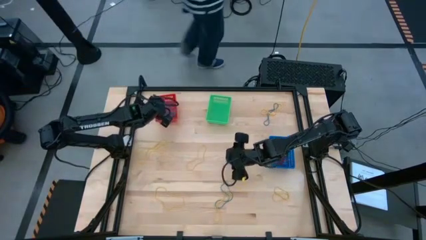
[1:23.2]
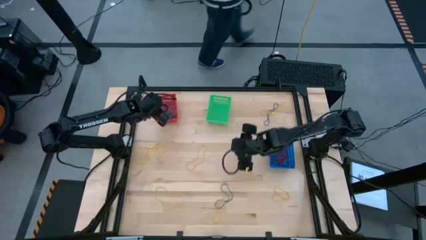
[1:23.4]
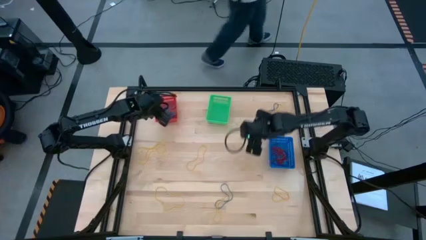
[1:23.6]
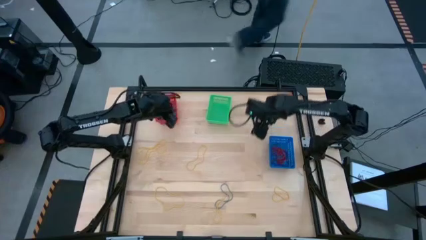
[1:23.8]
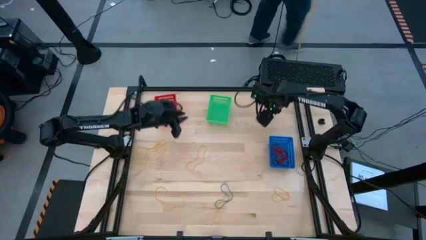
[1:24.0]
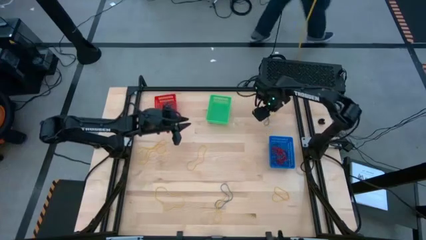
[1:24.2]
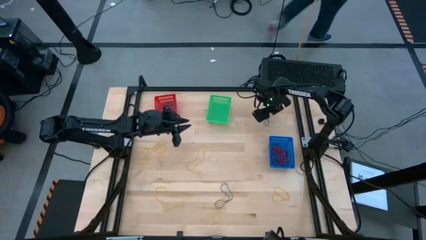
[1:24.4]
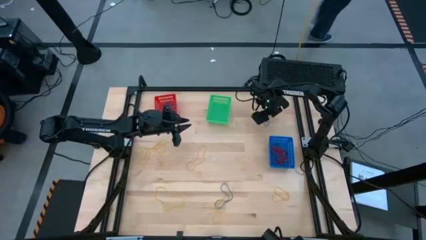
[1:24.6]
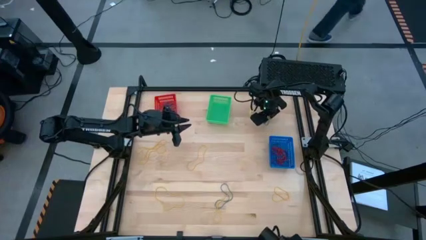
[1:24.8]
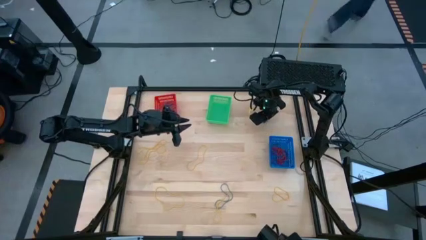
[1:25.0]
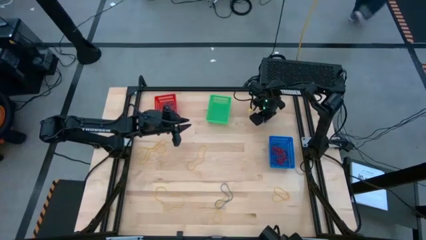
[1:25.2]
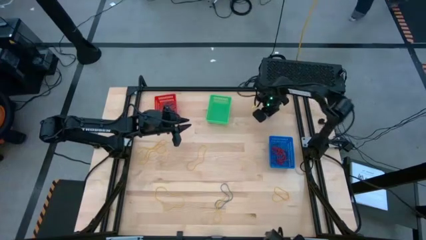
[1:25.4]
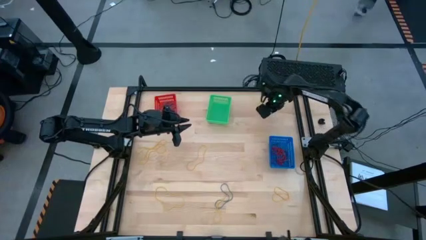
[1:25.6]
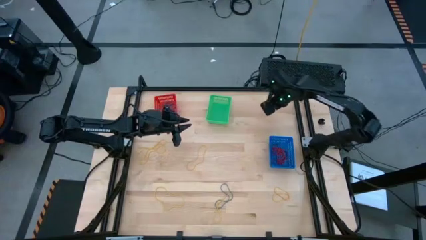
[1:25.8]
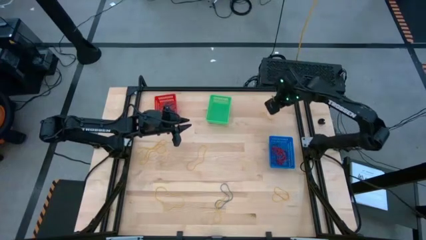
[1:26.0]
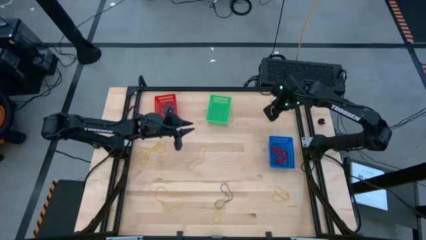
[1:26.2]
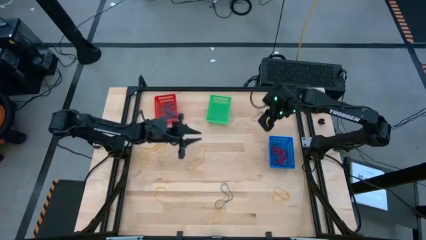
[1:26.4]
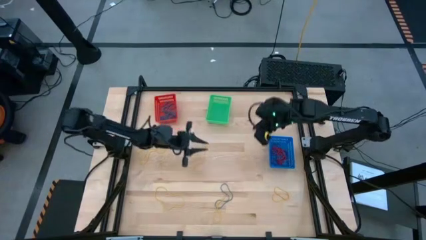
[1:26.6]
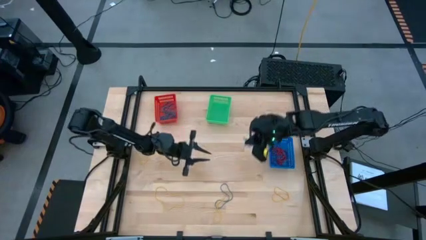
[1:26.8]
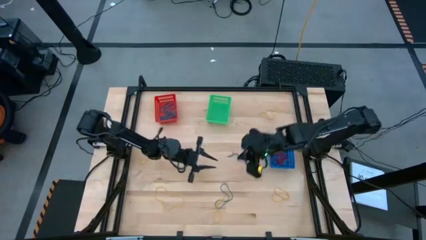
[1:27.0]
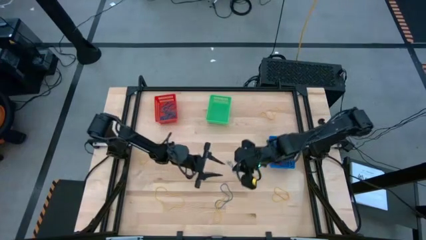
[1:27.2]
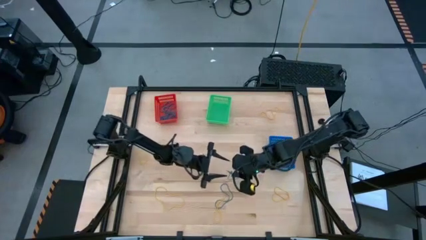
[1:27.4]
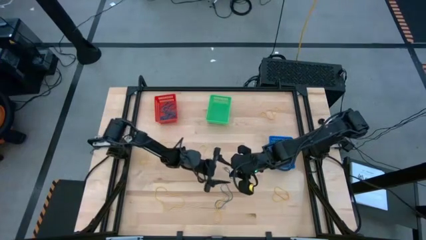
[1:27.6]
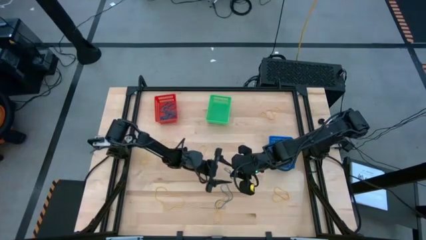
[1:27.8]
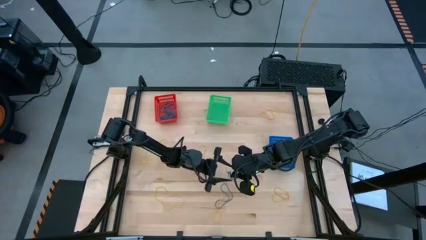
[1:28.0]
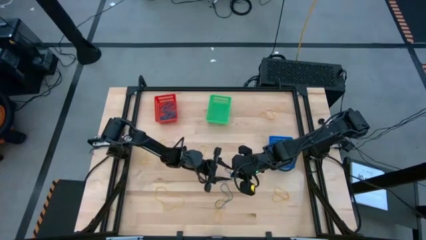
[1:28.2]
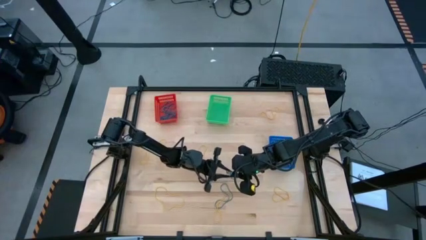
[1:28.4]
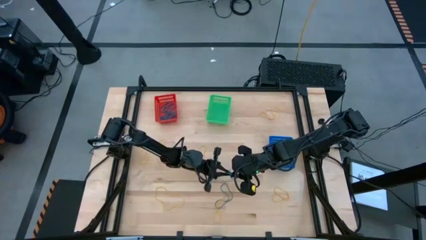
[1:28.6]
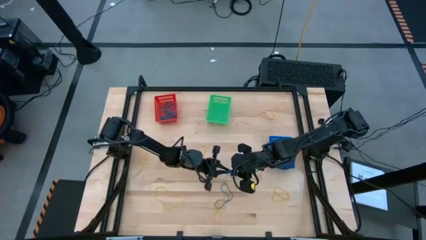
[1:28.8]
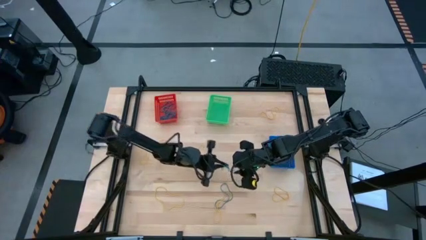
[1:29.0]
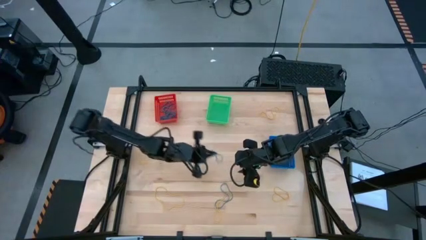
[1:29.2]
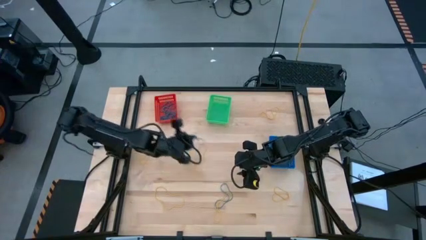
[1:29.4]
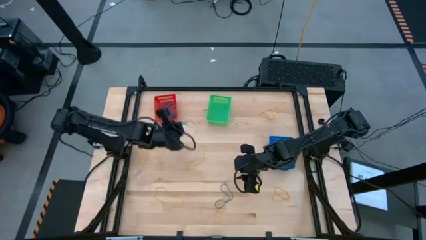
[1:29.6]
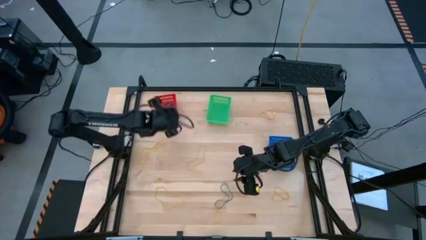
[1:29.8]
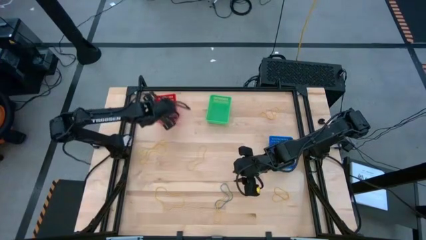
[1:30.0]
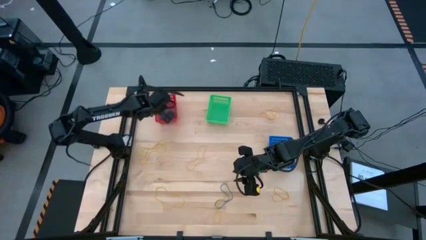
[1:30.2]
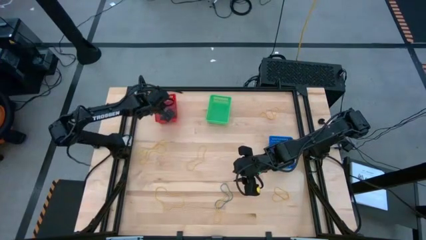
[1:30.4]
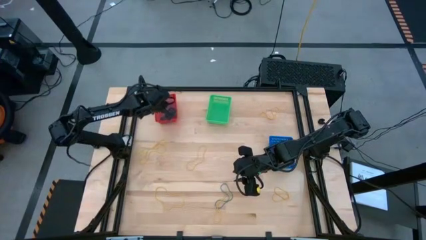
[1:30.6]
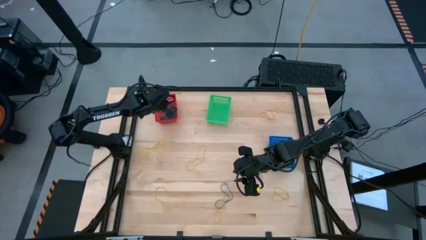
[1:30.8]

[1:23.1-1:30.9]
Task: Sort rubber bands into baskets
Put the blue rubber band into the red bin

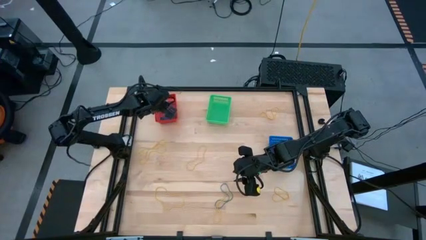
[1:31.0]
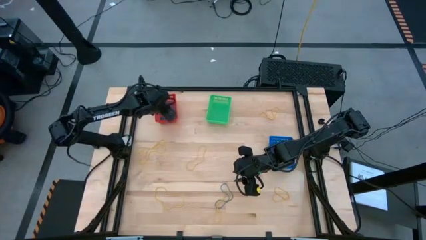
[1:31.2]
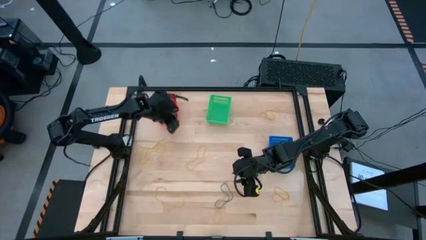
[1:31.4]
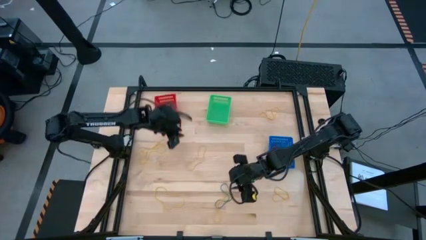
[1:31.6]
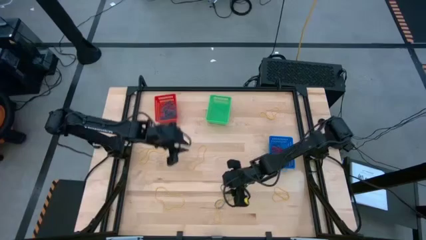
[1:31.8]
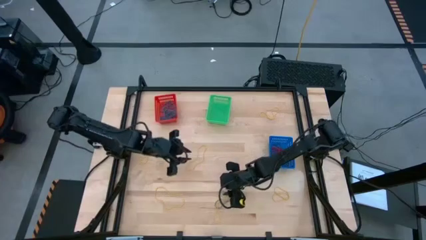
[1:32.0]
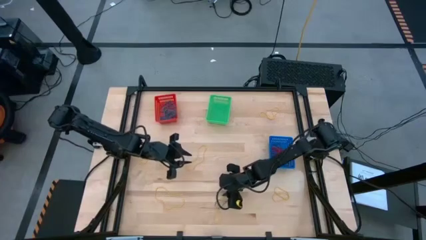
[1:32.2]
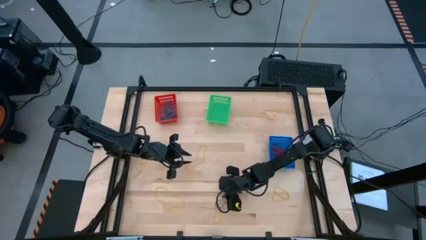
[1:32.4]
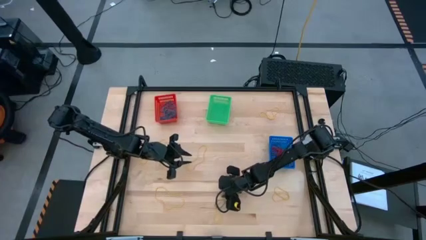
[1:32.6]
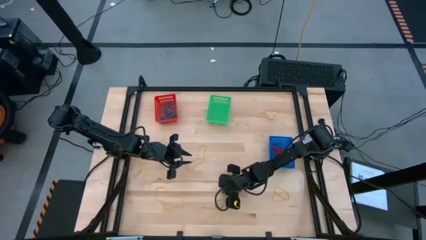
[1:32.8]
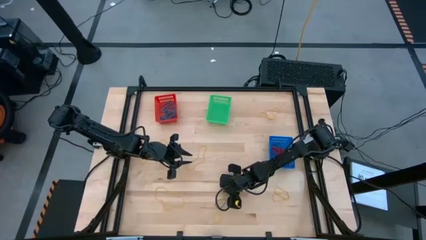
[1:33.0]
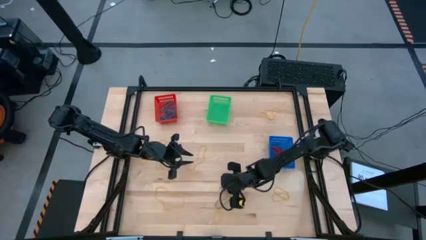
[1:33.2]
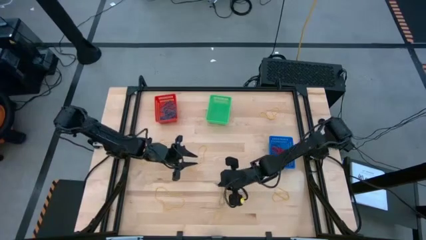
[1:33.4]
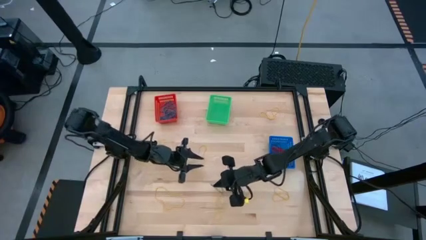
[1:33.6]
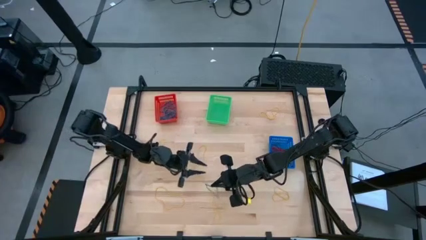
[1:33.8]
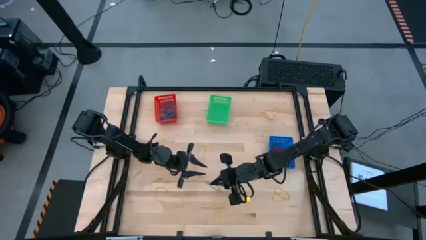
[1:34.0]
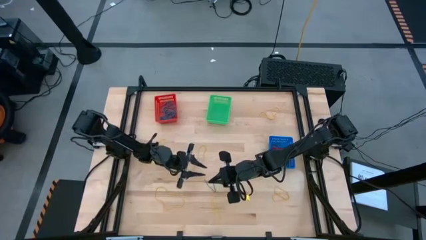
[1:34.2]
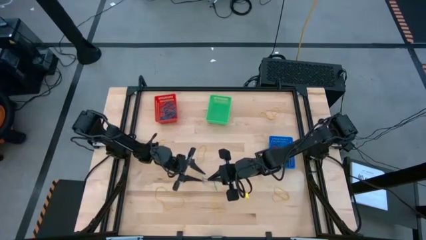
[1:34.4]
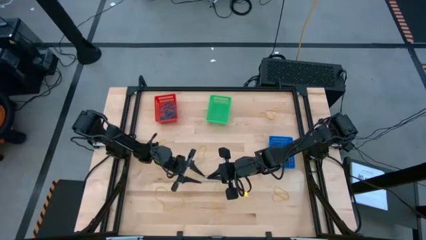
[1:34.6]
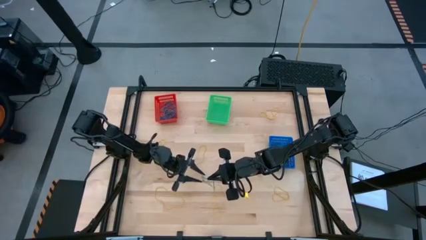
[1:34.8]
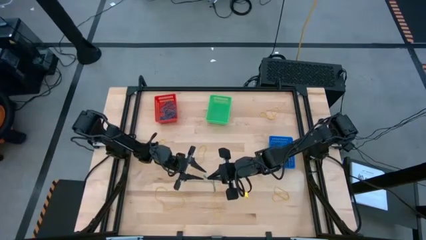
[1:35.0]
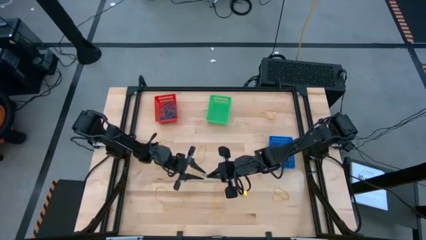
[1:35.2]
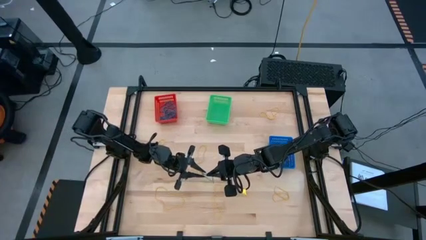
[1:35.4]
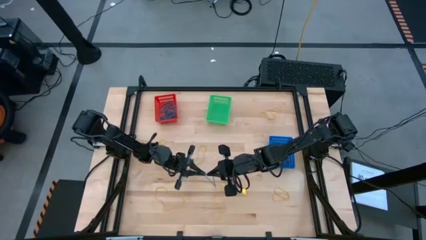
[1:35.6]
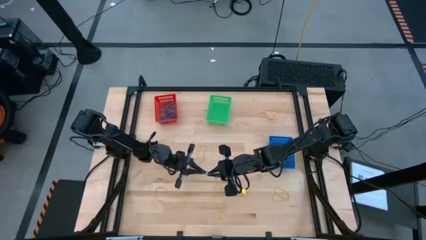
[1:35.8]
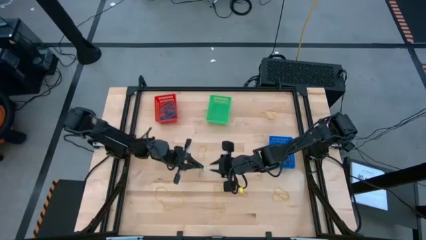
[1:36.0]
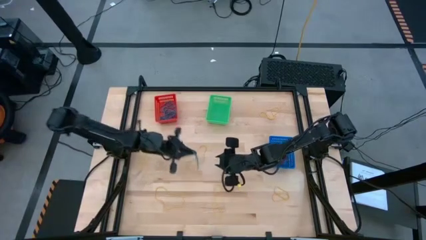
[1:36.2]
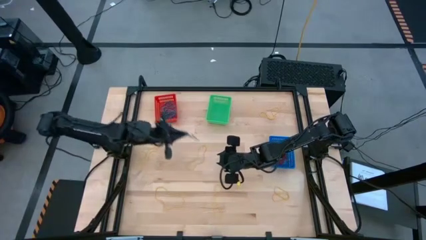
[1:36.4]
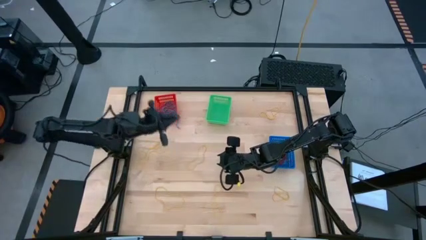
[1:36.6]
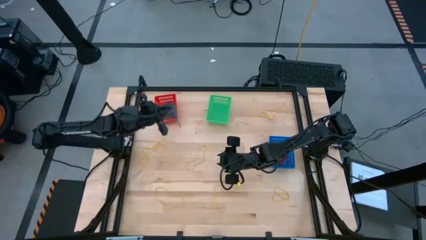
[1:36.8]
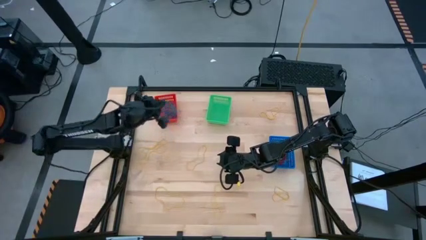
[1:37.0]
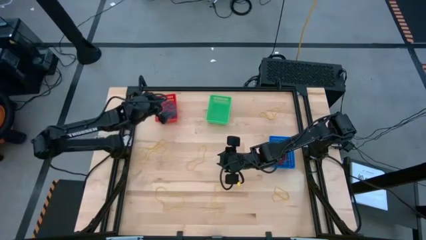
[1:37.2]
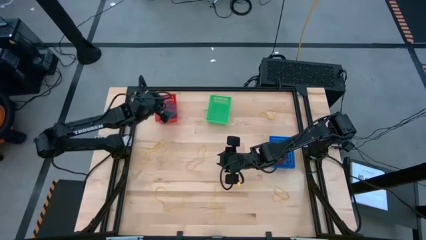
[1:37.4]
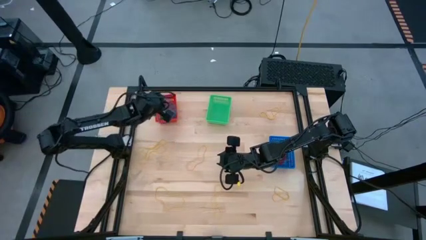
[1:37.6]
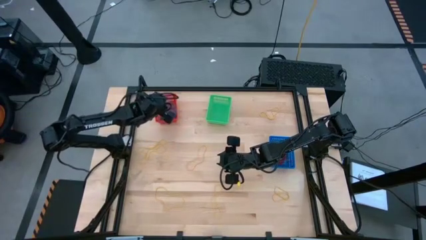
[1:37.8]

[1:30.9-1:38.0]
Put the blue rubber band into the red bin

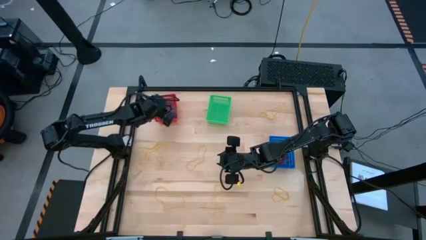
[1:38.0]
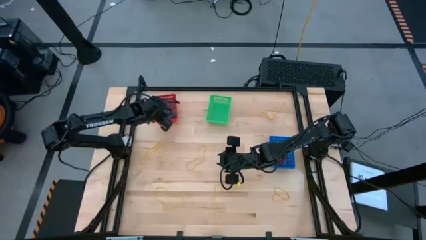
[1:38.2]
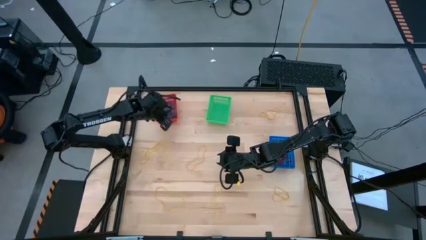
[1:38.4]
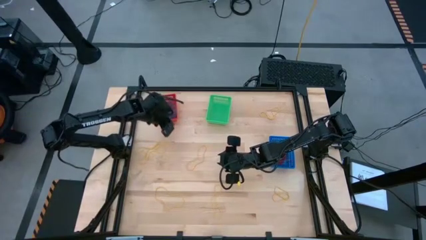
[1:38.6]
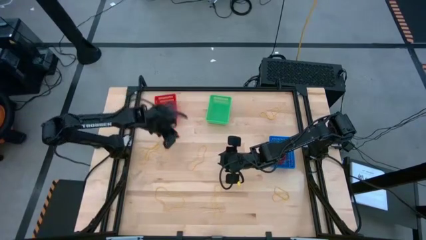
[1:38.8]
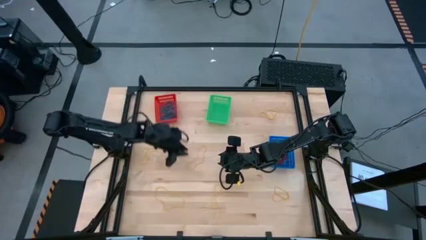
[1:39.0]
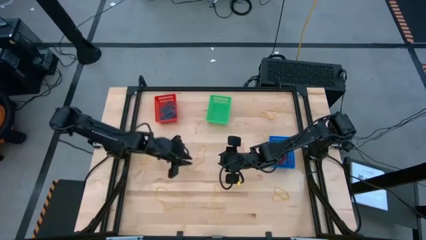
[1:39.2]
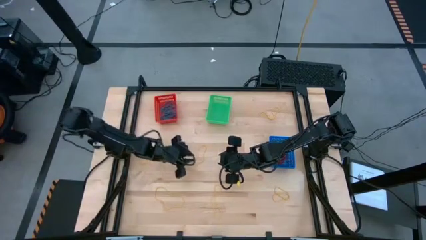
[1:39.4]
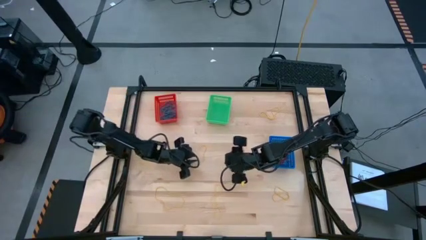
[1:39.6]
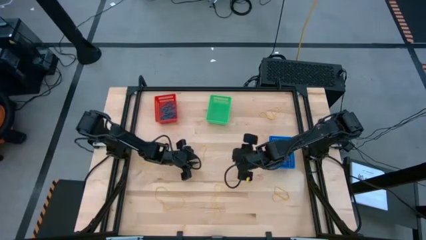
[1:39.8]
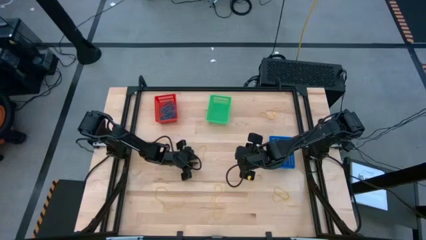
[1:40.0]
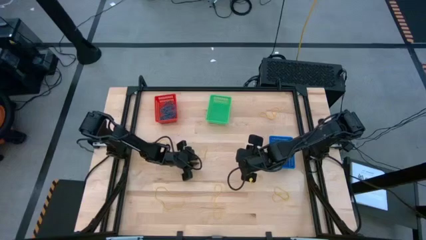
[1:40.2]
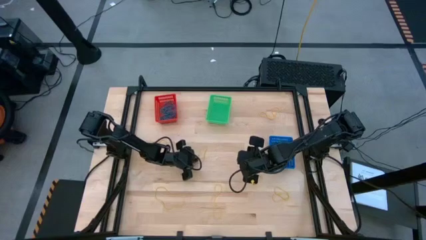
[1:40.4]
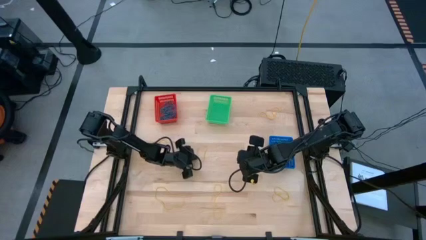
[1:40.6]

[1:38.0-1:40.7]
Put the yellow rubber band into the green bin
